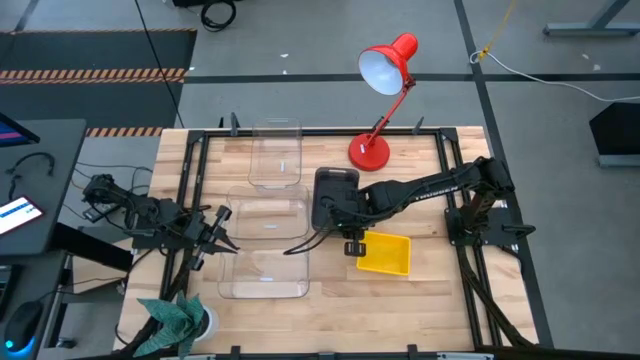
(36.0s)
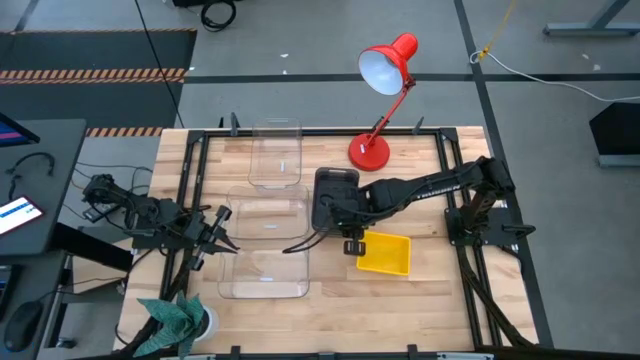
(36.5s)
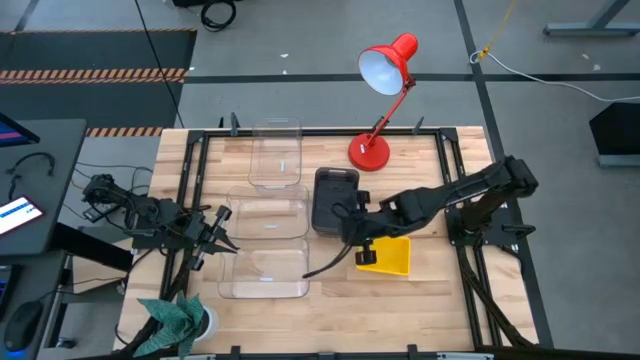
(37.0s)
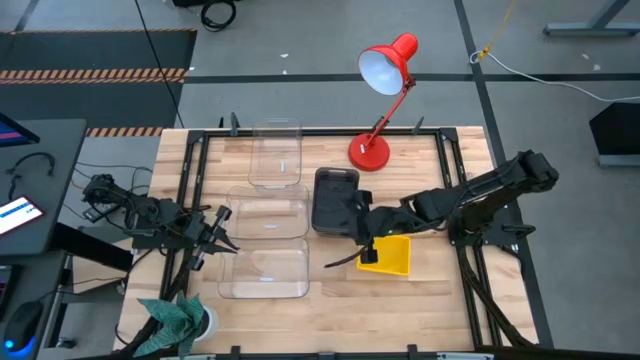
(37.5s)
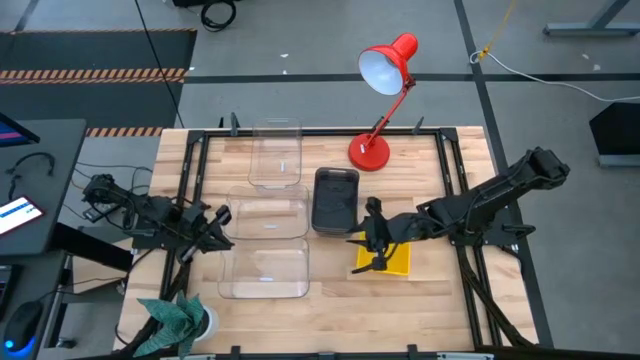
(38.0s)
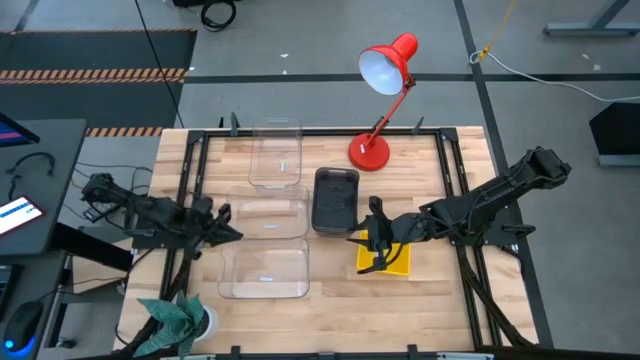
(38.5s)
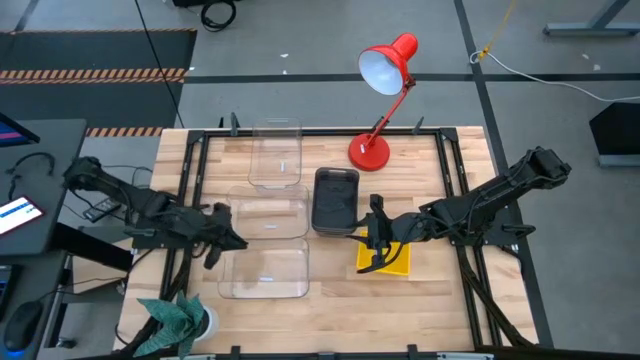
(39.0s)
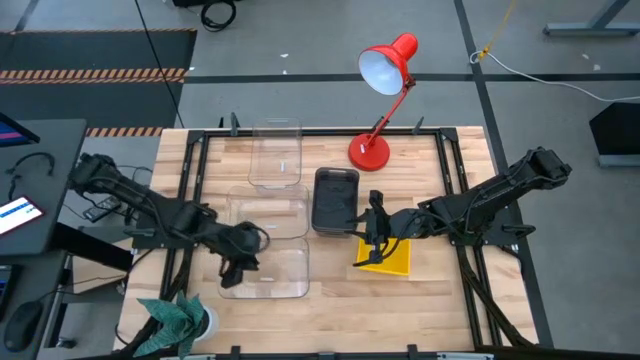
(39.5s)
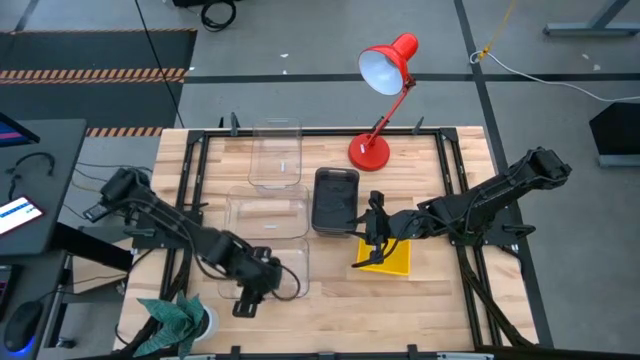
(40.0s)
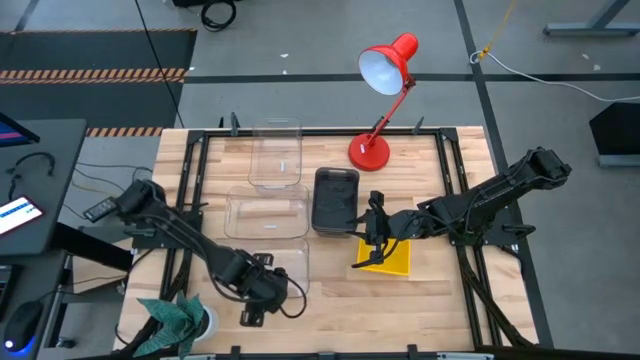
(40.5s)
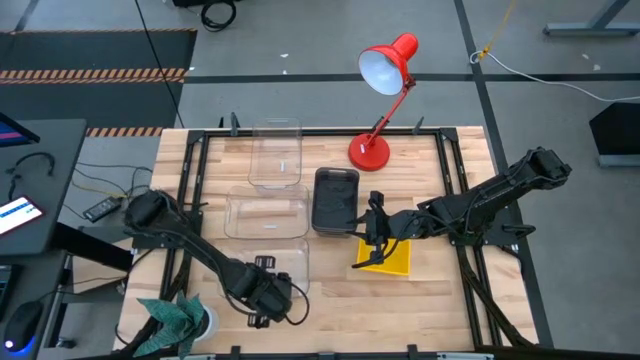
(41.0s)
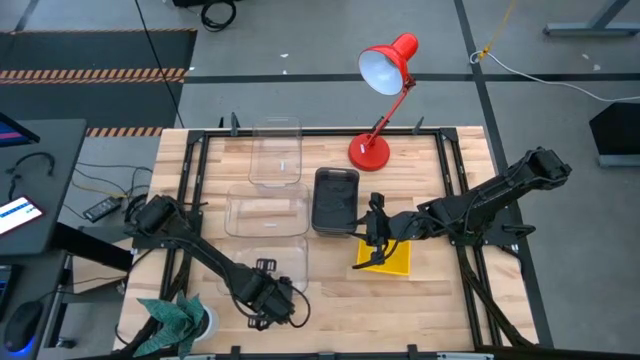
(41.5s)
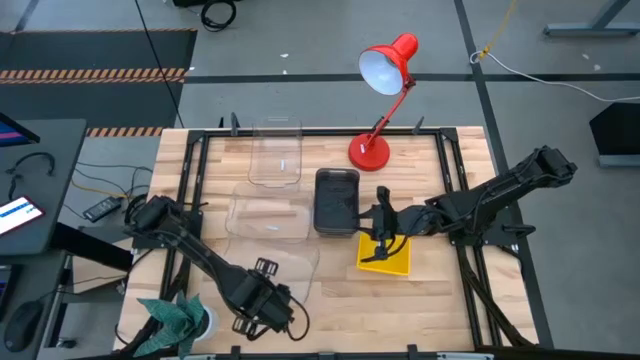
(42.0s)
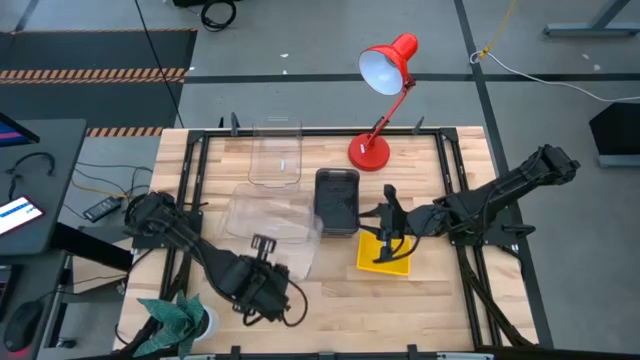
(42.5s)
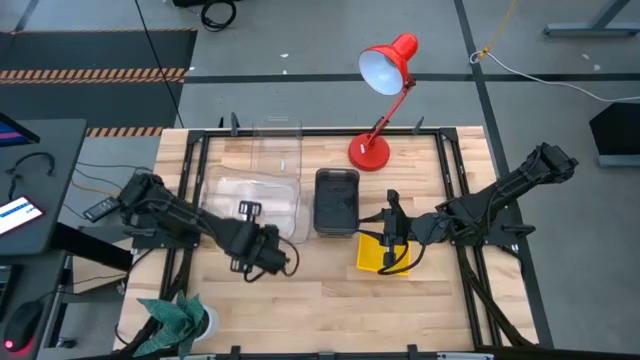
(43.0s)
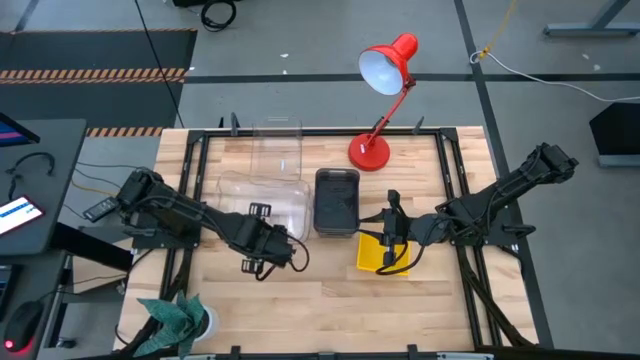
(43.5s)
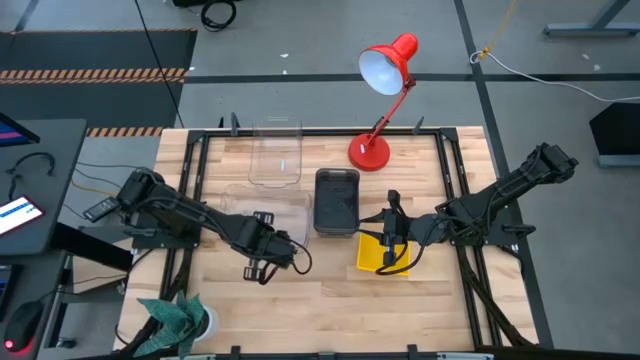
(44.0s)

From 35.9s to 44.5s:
Stack the bottom transparent bin on the middle transparent bin

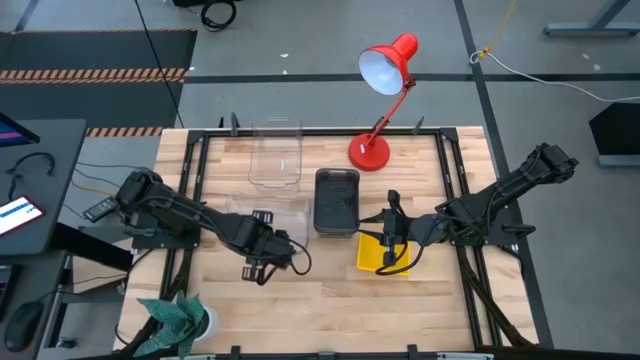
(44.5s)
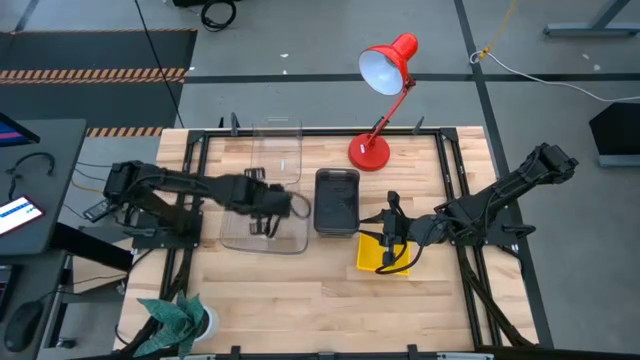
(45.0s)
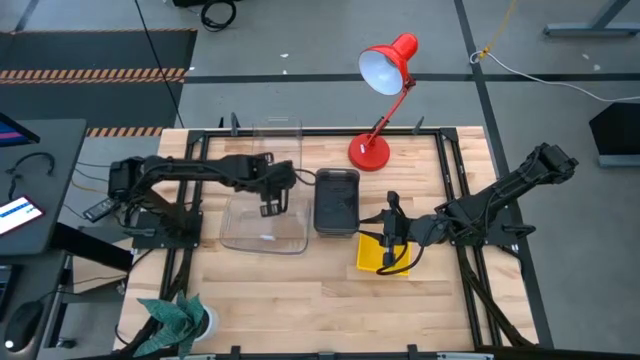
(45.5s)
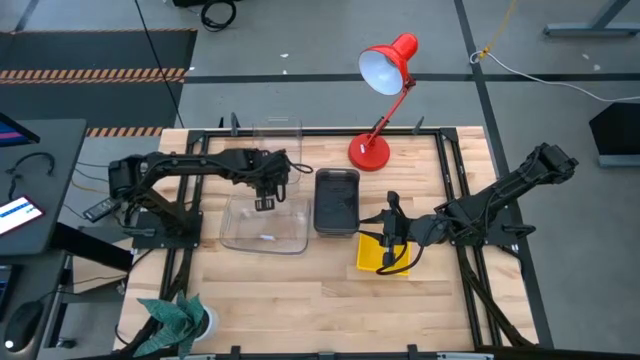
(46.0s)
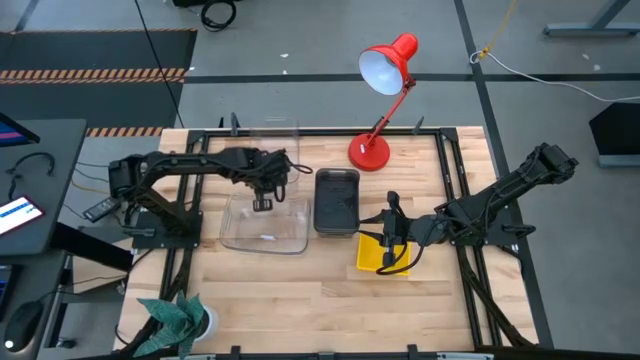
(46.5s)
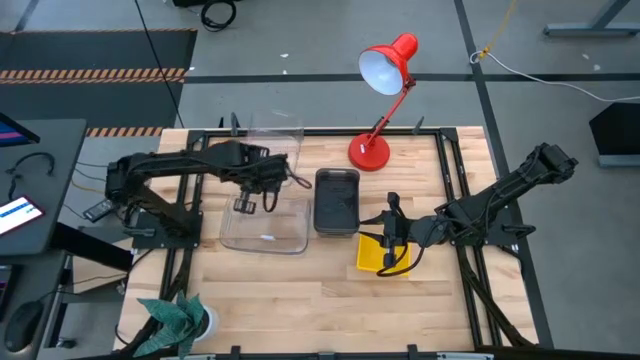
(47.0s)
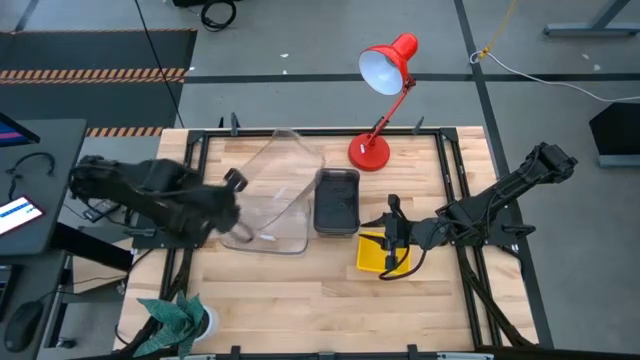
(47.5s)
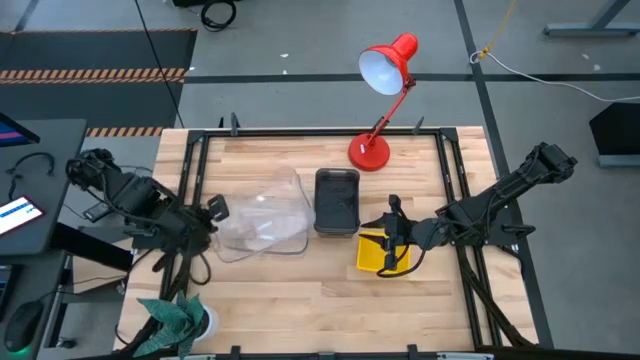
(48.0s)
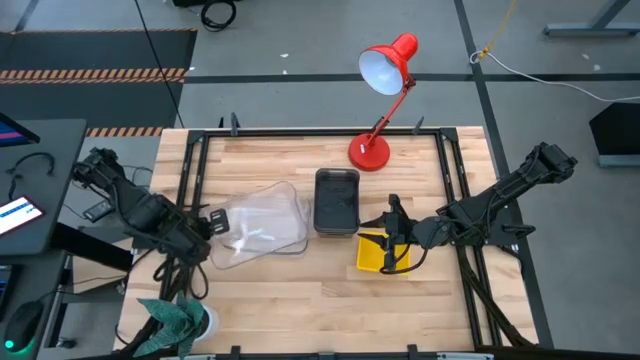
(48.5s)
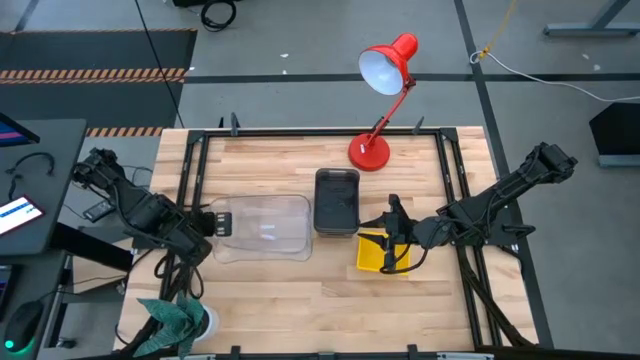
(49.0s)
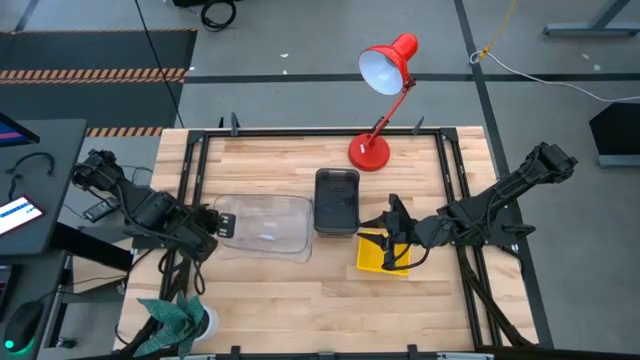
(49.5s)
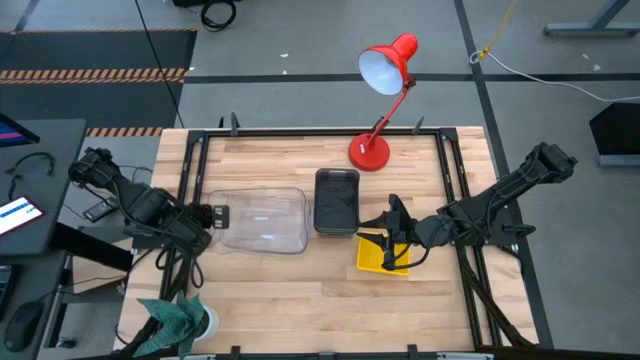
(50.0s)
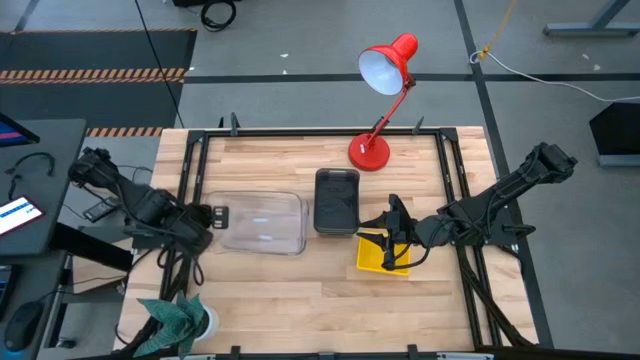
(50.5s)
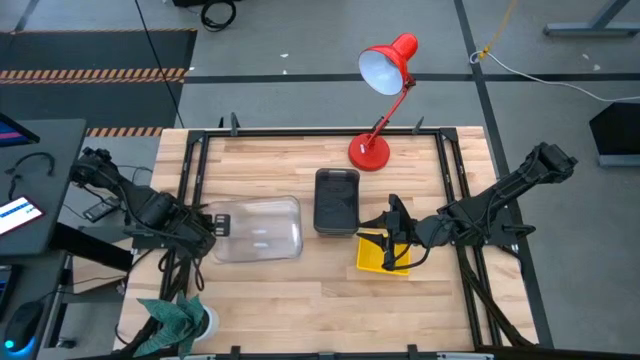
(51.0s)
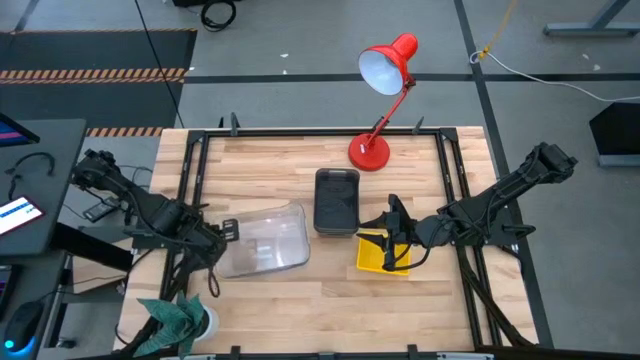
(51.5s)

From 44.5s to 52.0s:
Stack the top transparent bin on the stacked transparent bins

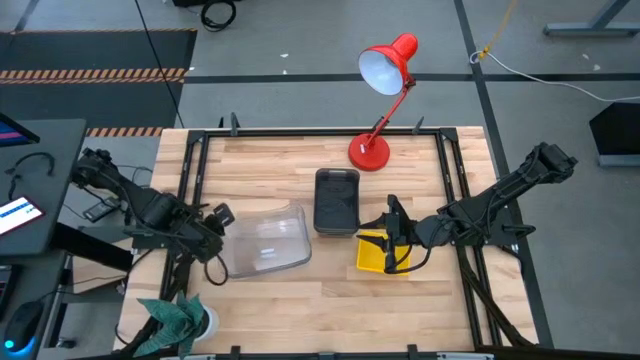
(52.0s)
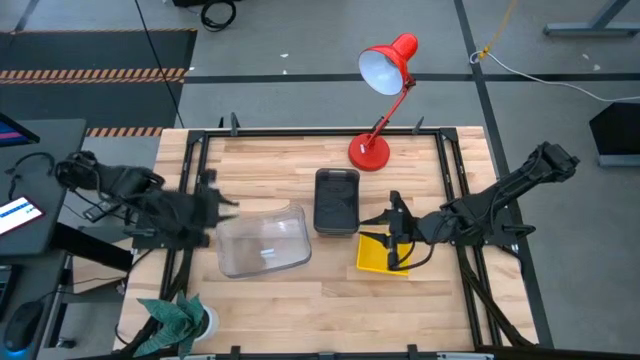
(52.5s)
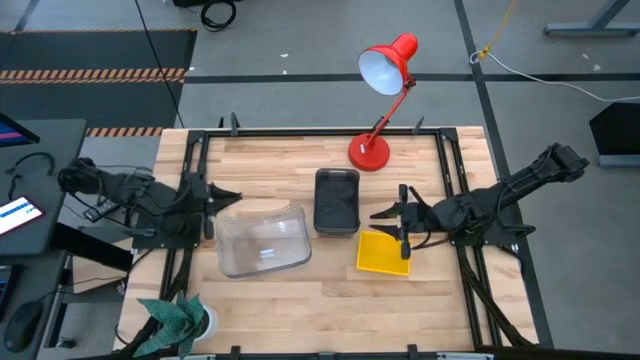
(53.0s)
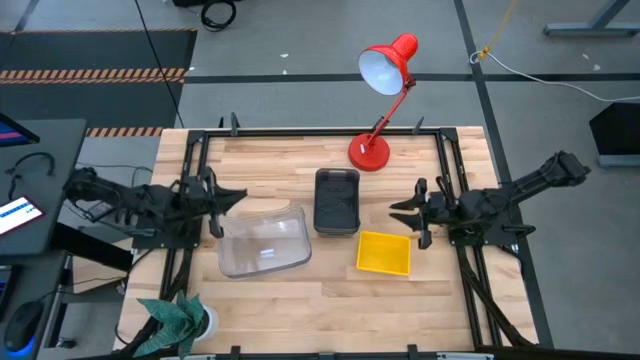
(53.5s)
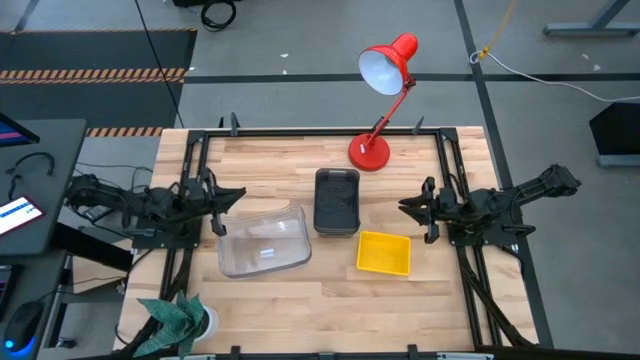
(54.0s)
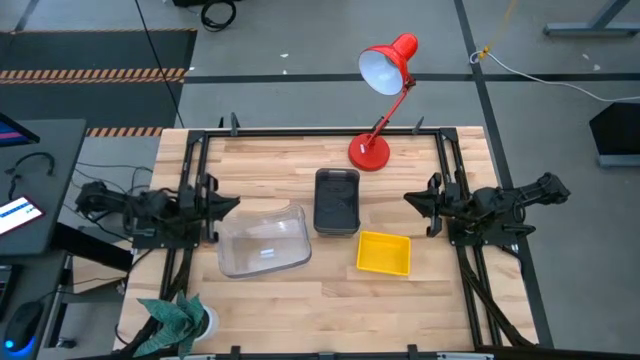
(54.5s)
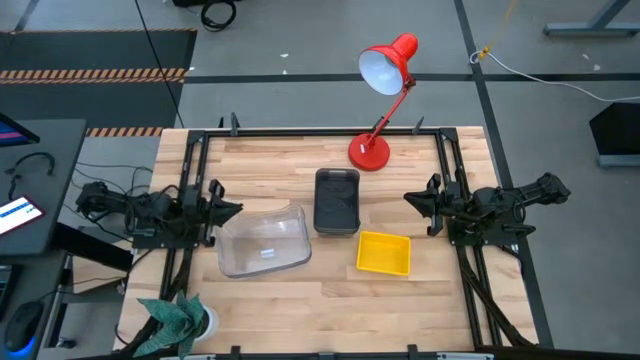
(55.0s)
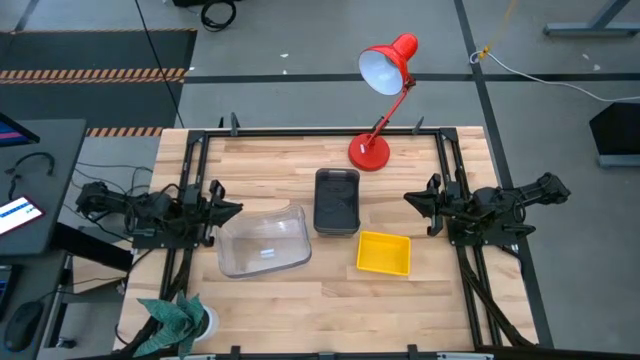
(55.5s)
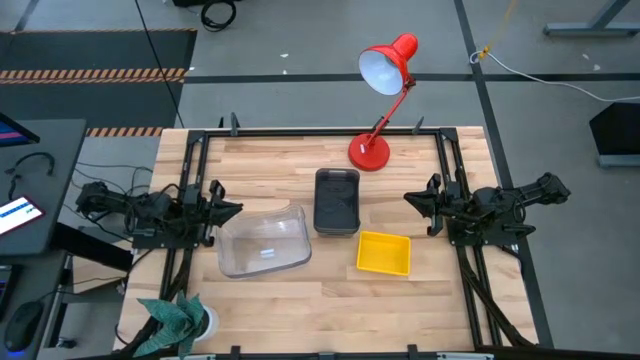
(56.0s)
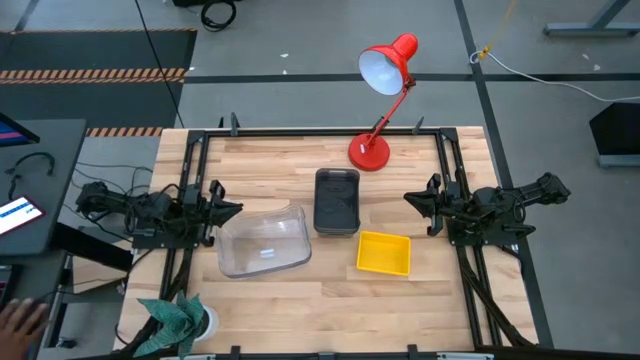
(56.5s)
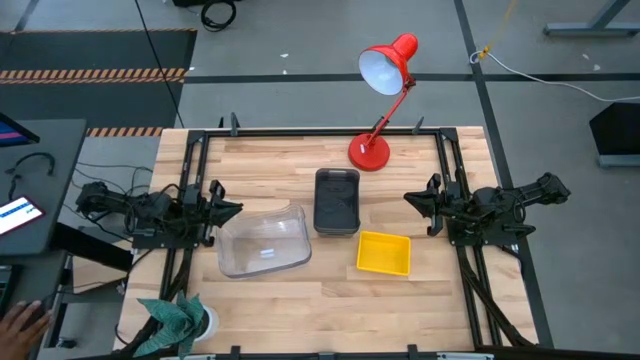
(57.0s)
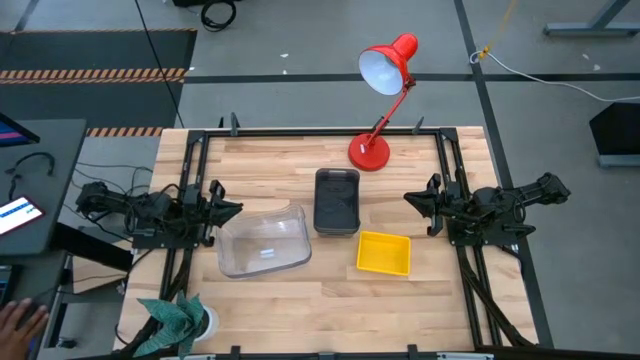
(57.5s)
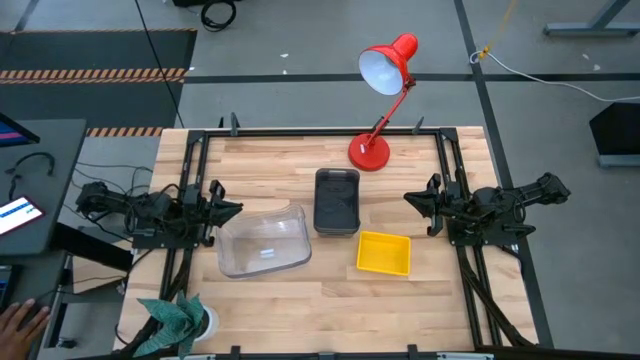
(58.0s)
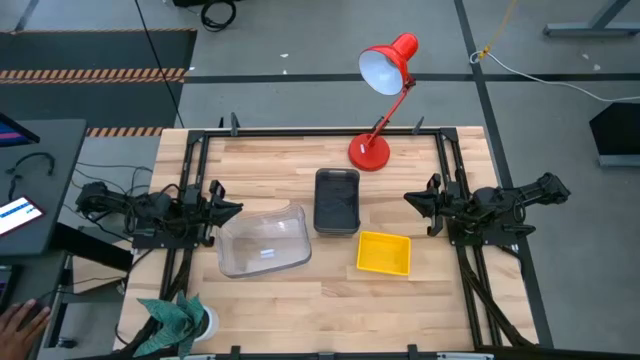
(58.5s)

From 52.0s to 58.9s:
Return to Home Position
